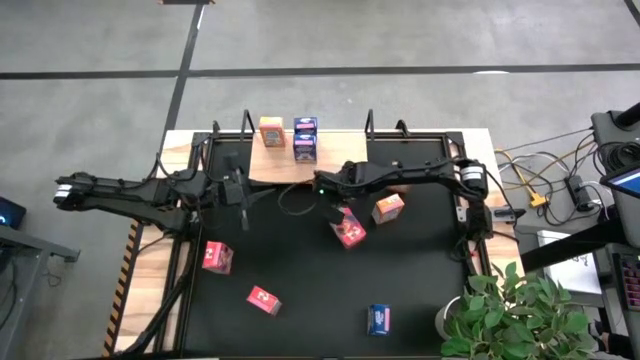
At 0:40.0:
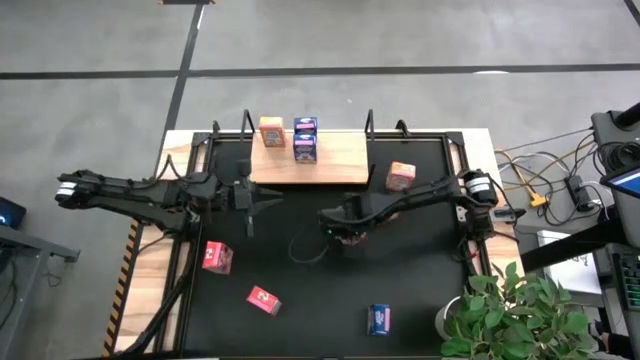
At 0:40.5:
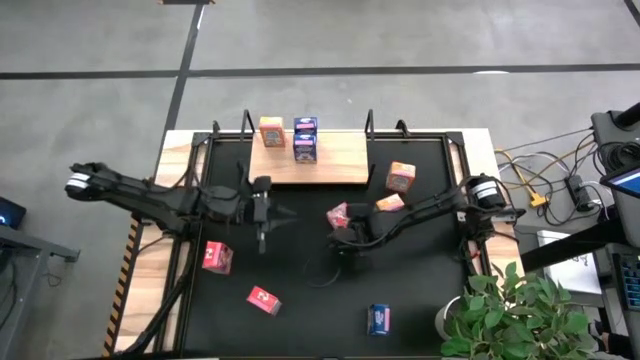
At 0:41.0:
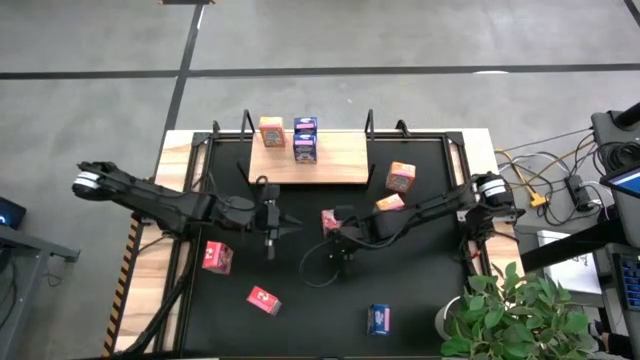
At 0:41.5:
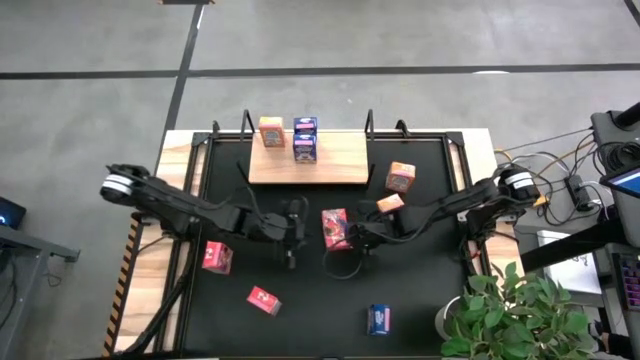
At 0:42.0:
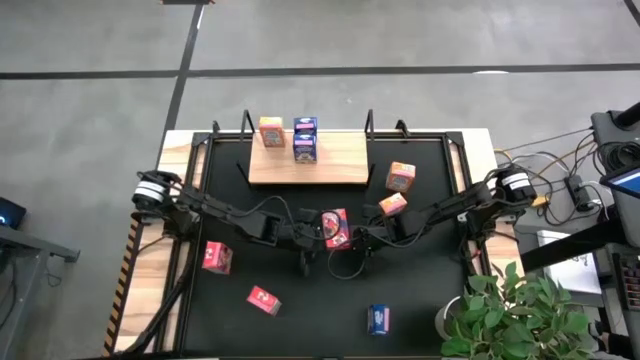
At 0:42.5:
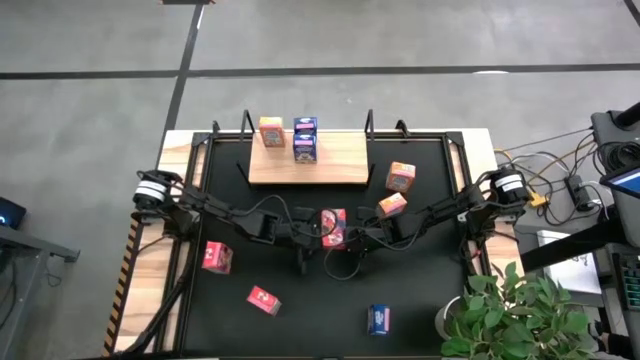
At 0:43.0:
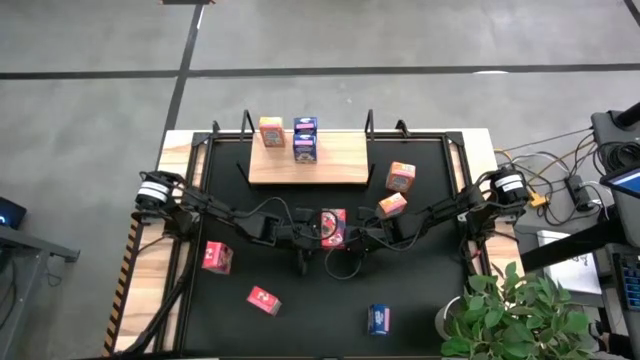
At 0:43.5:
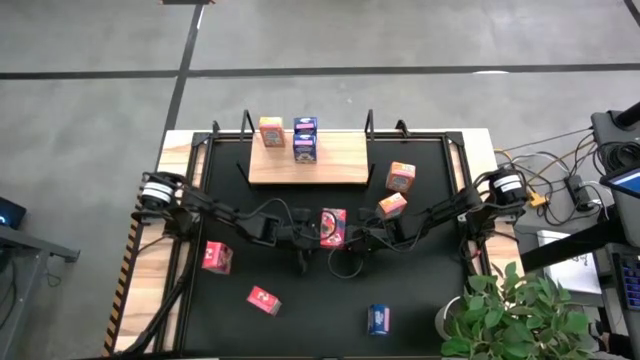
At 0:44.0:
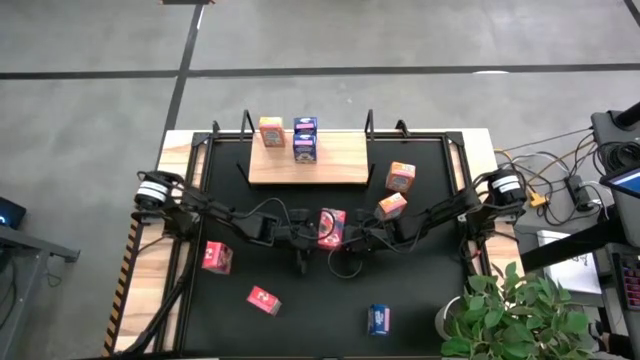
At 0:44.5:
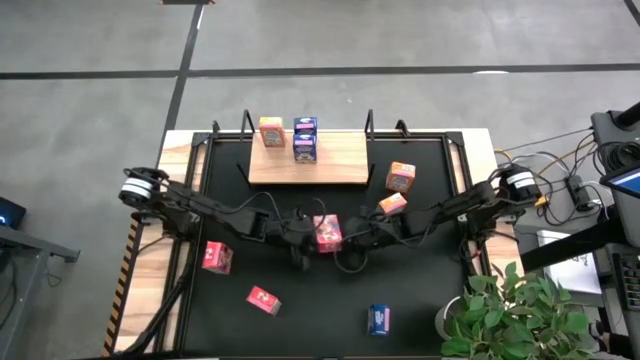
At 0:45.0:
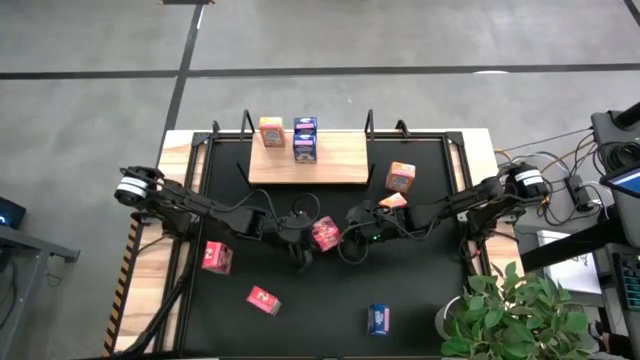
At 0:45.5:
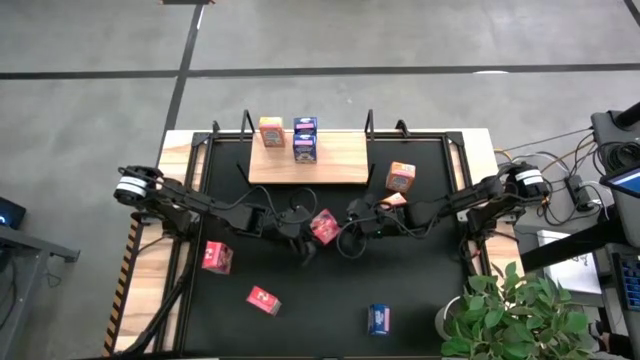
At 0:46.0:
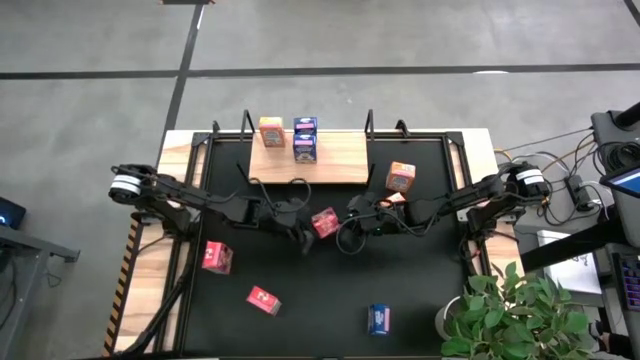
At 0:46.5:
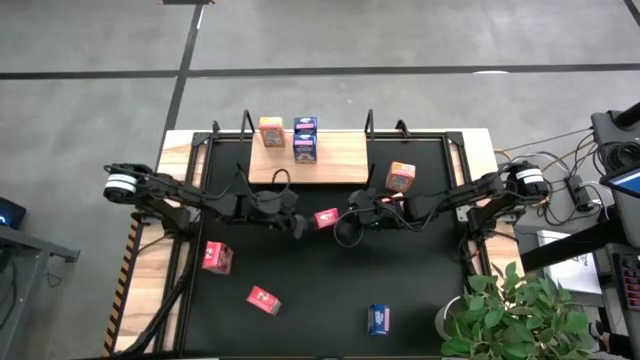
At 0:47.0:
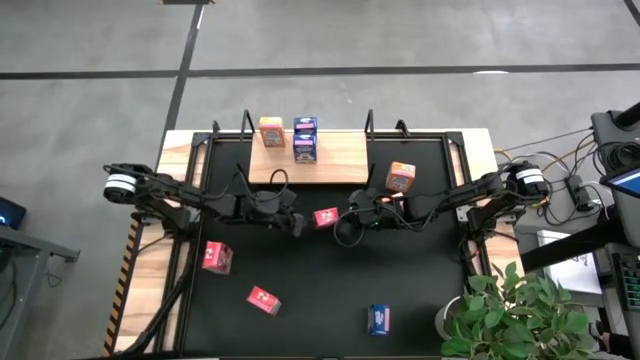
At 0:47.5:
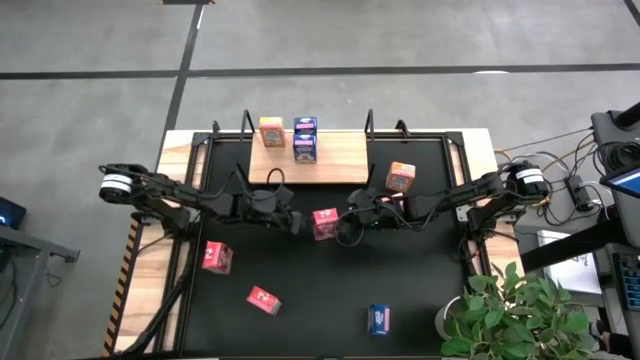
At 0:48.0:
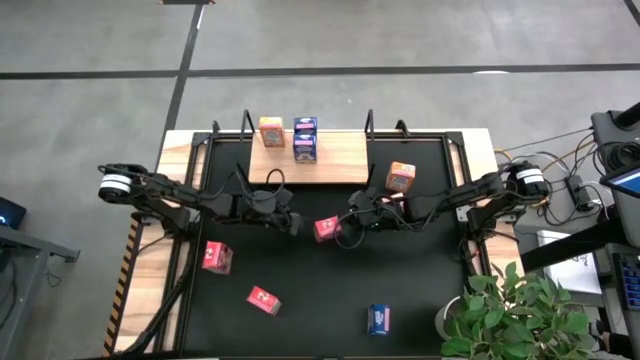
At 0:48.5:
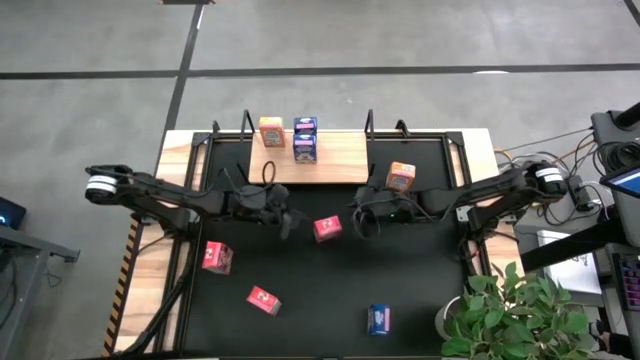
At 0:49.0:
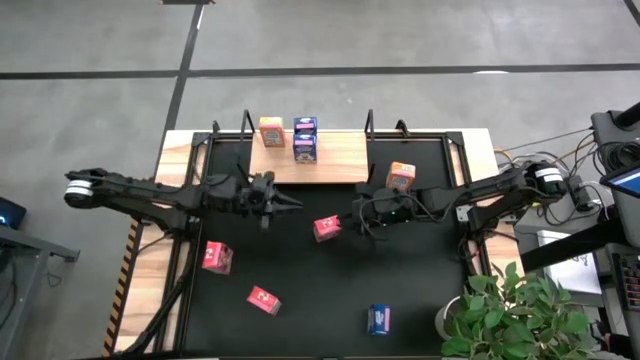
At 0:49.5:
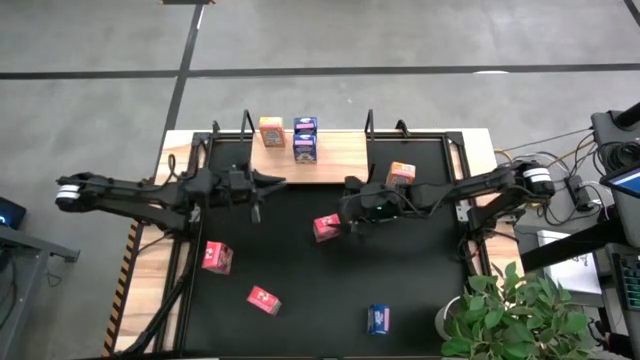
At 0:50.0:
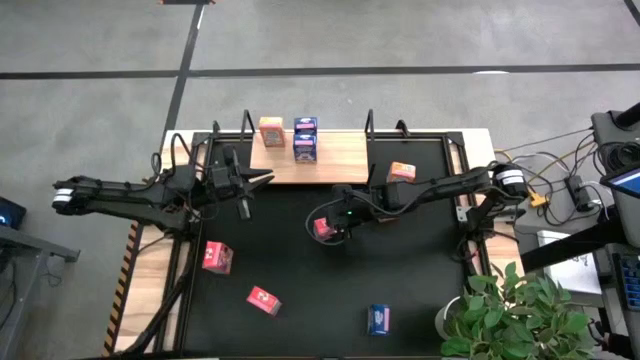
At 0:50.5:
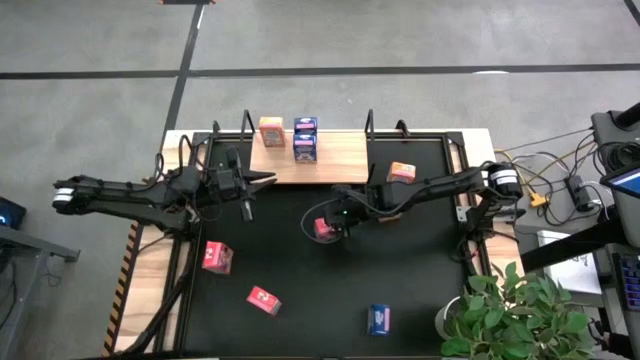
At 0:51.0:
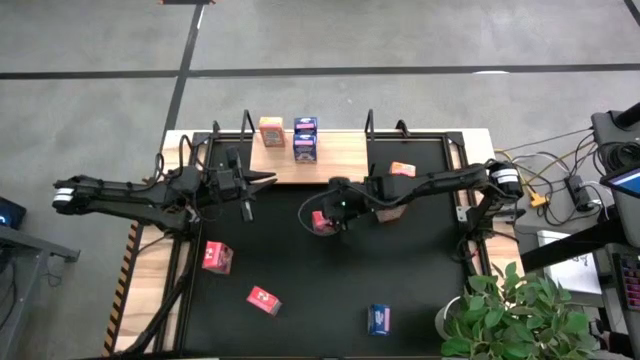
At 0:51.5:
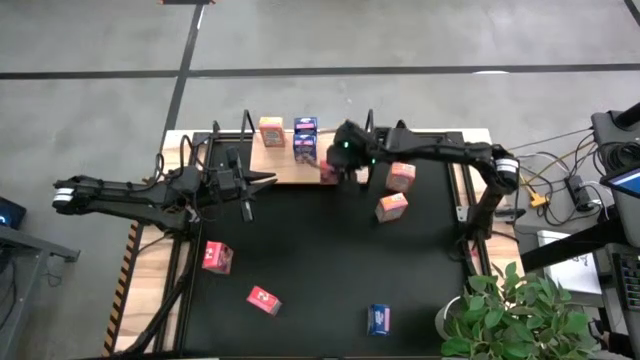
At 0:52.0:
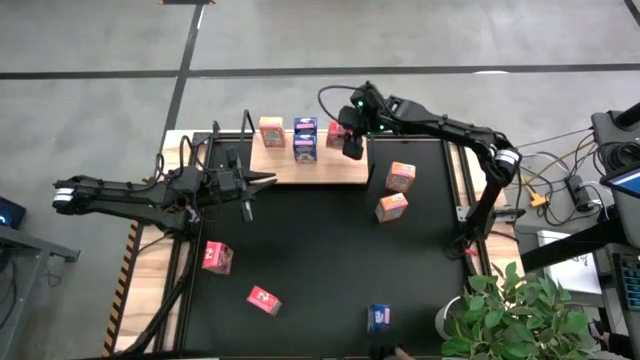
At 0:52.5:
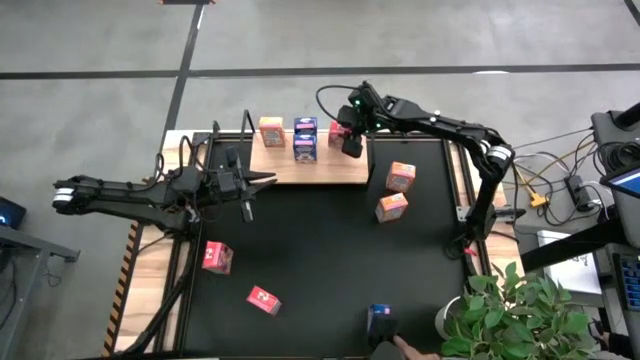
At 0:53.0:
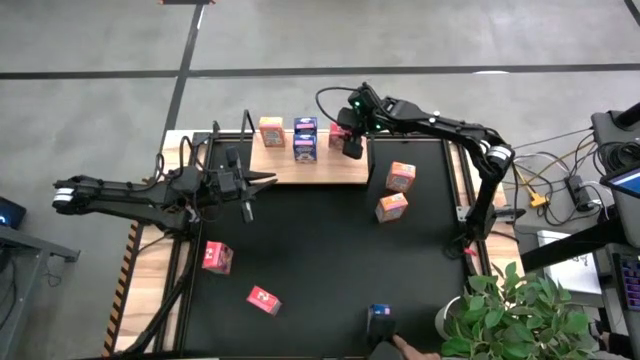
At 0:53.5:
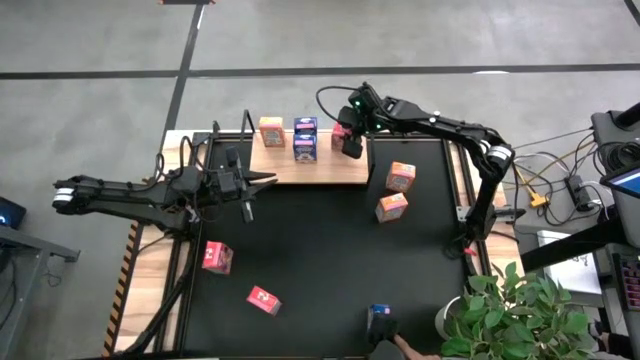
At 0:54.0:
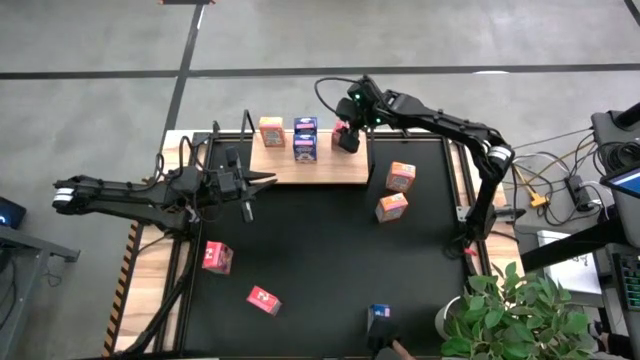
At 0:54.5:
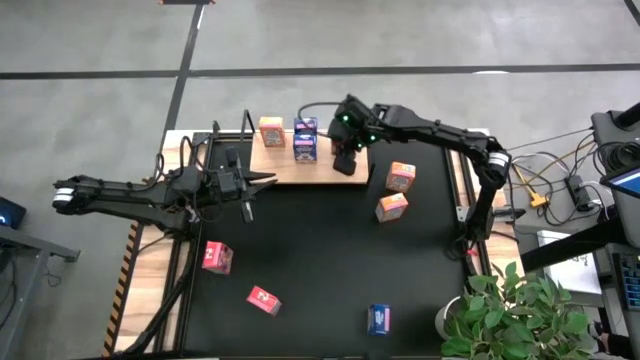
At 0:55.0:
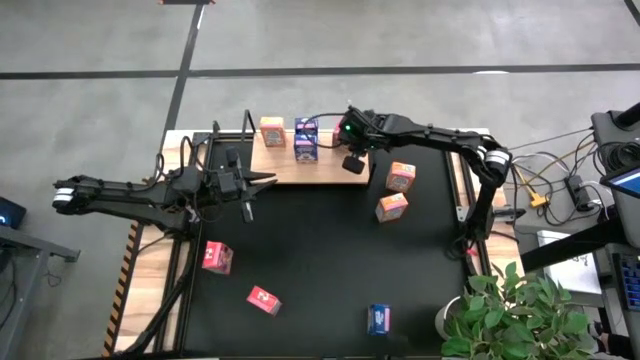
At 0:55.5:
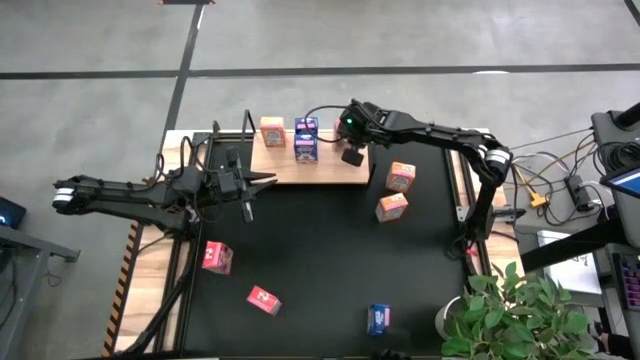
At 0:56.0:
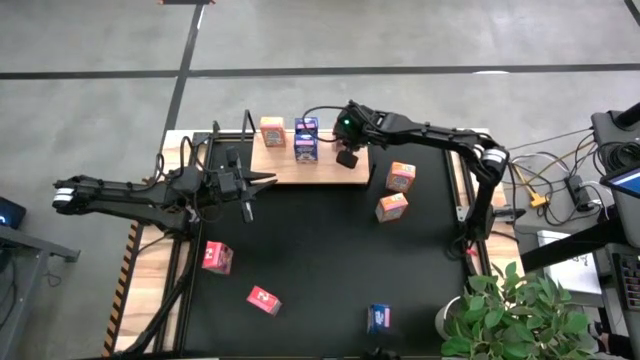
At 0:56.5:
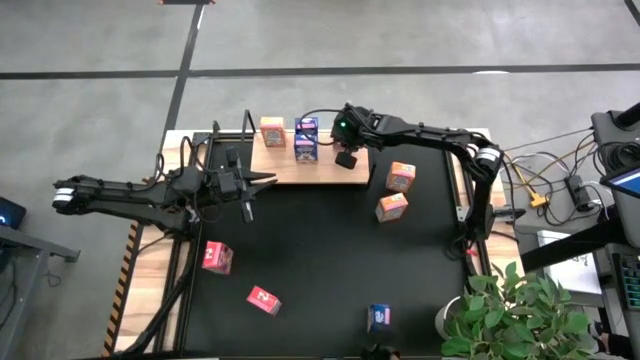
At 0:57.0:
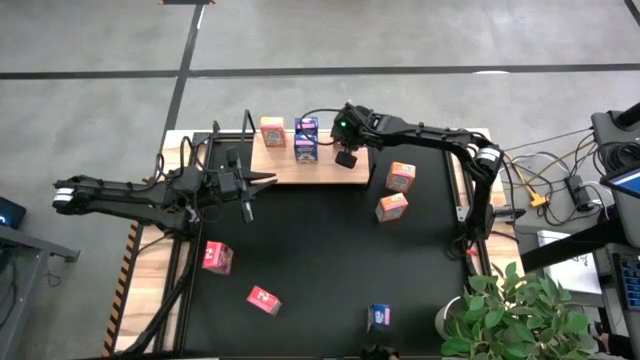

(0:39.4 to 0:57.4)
Task: Stack cereal on shelf
Put the top right red cereal box on the shelf

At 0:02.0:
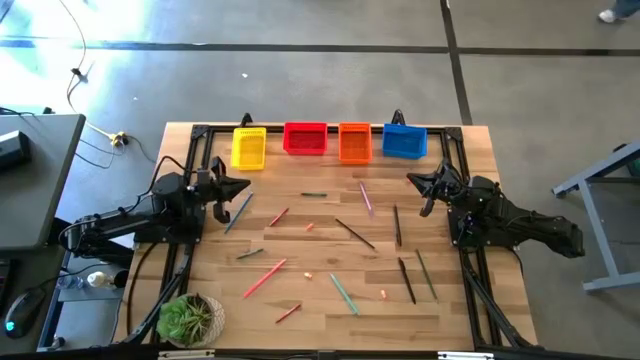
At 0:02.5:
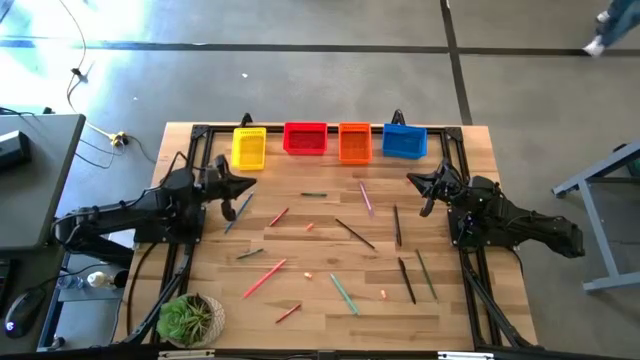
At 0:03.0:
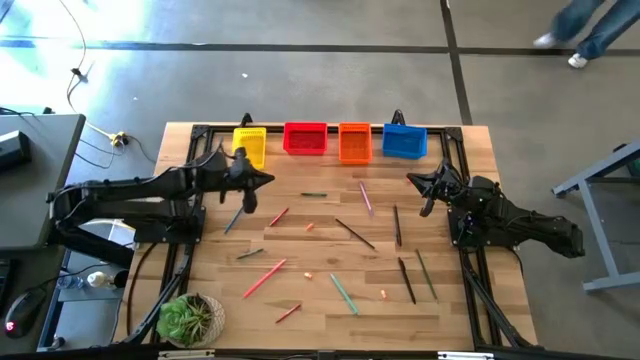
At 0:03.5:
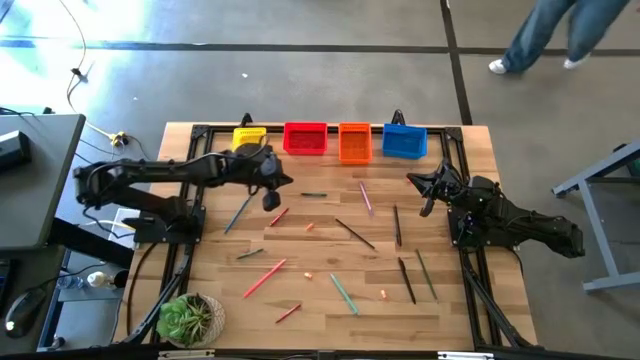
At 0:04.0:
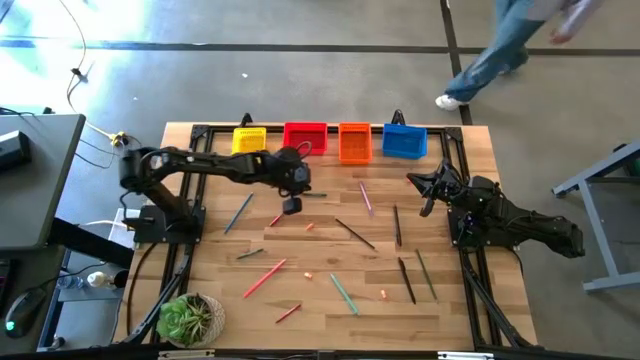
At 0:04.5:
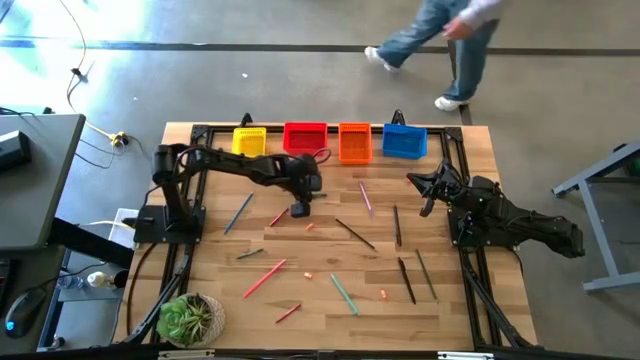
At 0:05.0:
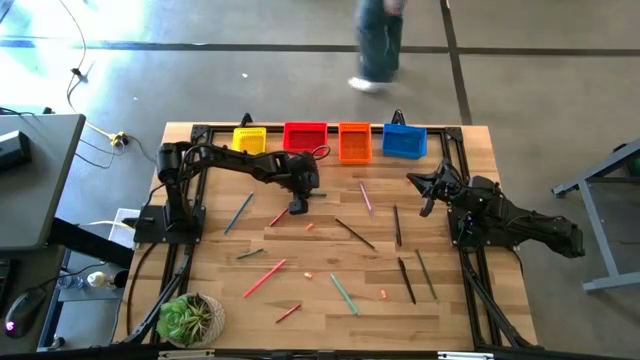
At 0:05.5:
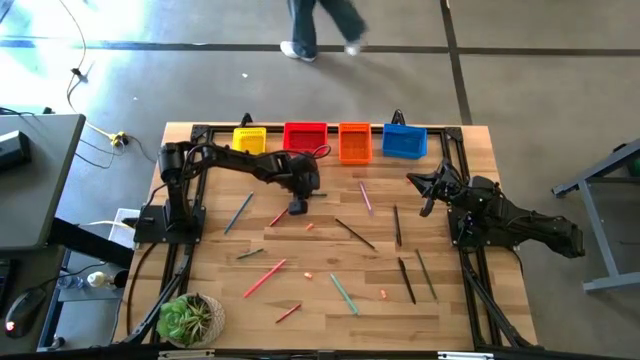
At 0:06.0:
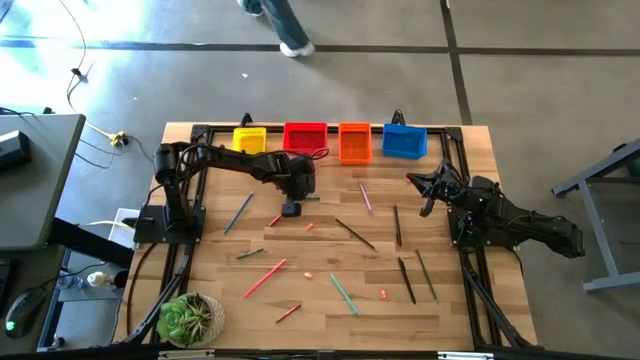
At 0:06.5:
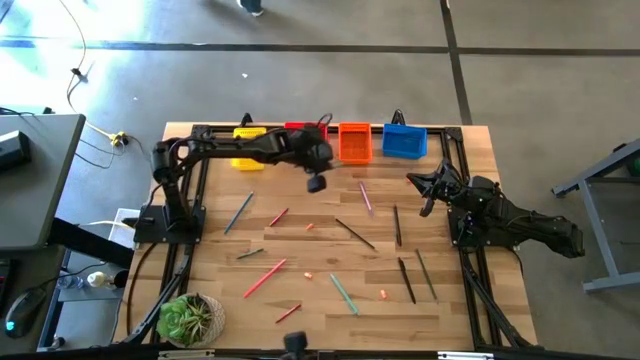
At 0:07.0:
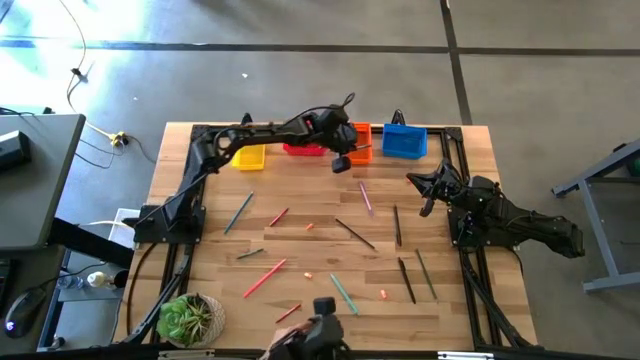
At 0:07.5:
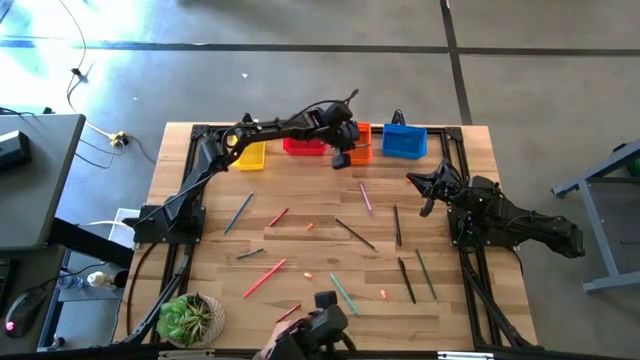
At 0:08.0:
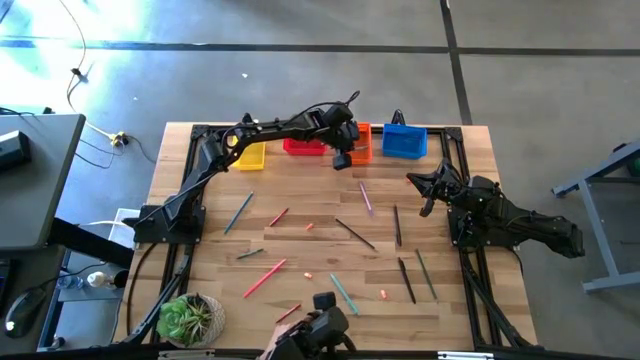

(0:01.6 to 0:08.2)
Task: Sort crayons/erasers/pens/pencils in bins
Put the top green crayon into the orange basket
